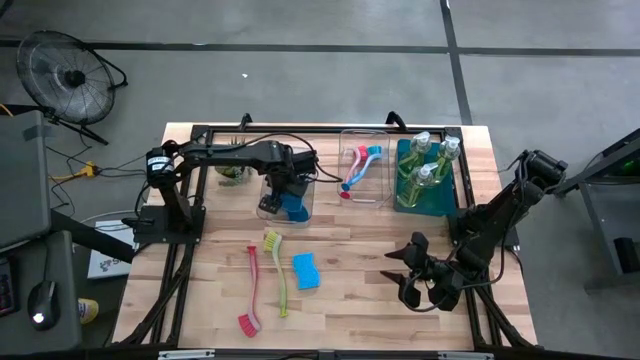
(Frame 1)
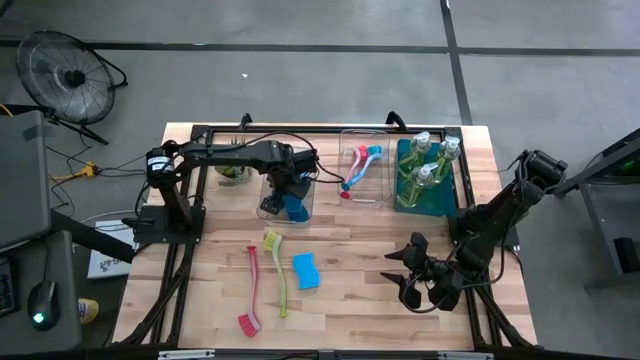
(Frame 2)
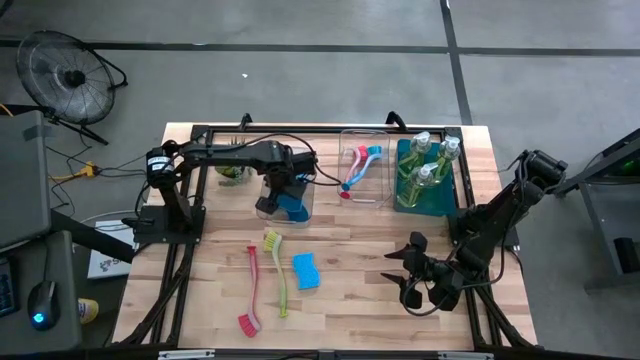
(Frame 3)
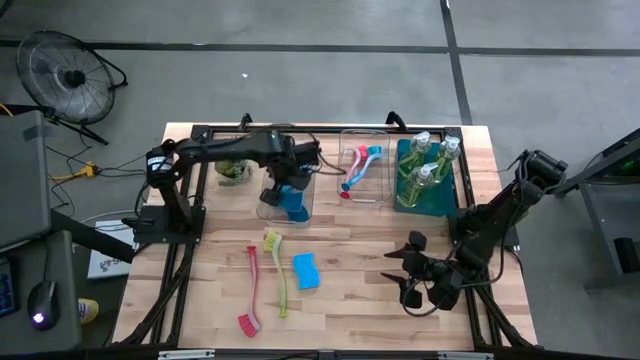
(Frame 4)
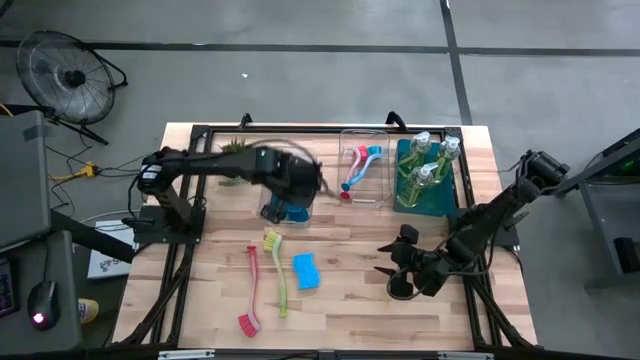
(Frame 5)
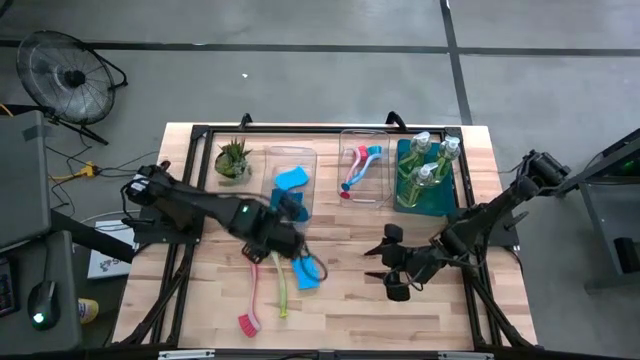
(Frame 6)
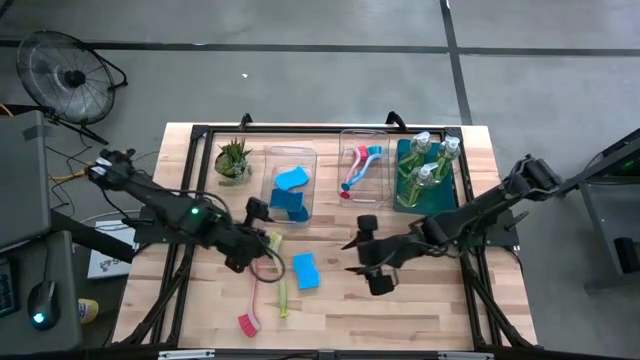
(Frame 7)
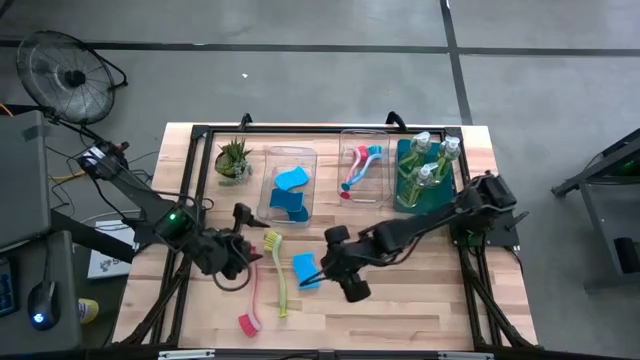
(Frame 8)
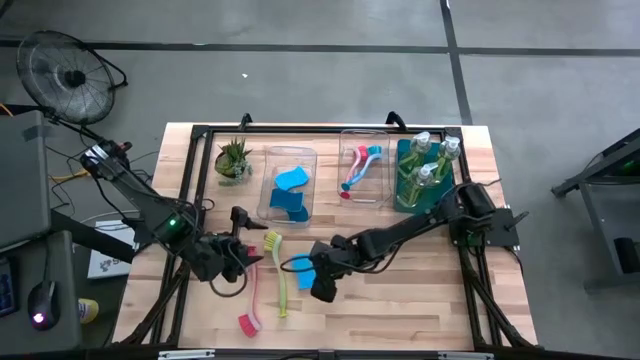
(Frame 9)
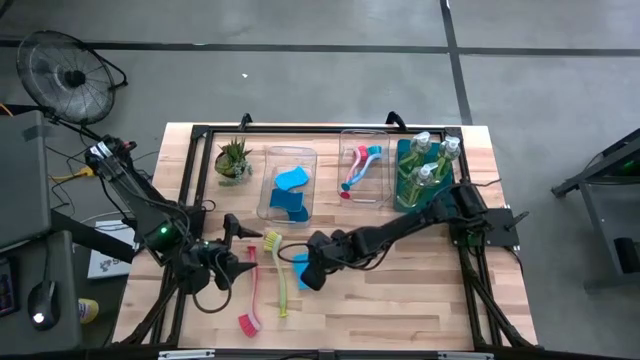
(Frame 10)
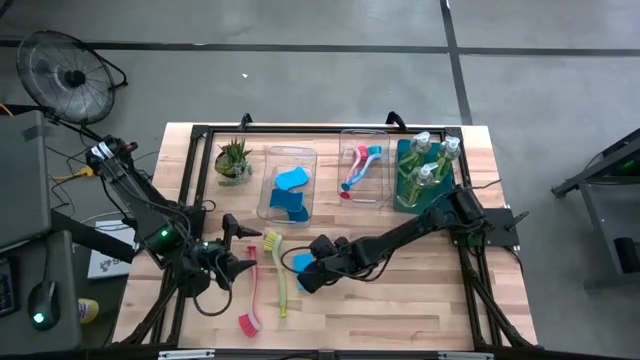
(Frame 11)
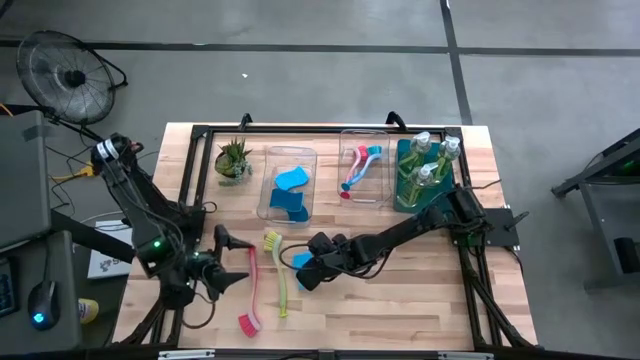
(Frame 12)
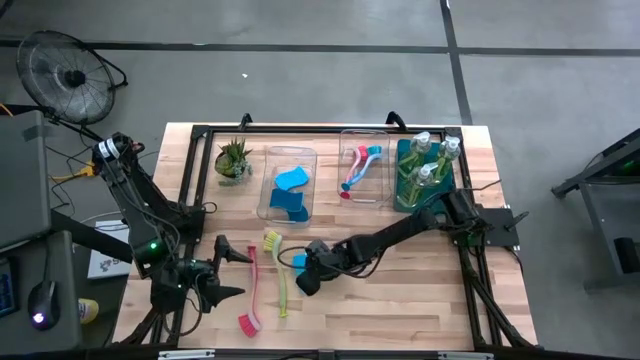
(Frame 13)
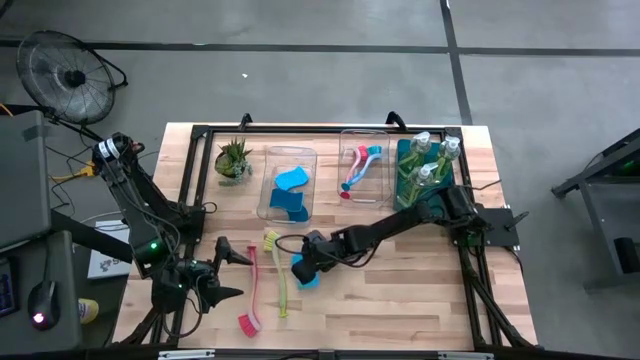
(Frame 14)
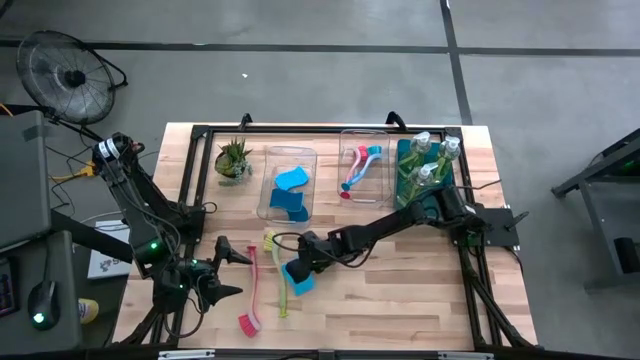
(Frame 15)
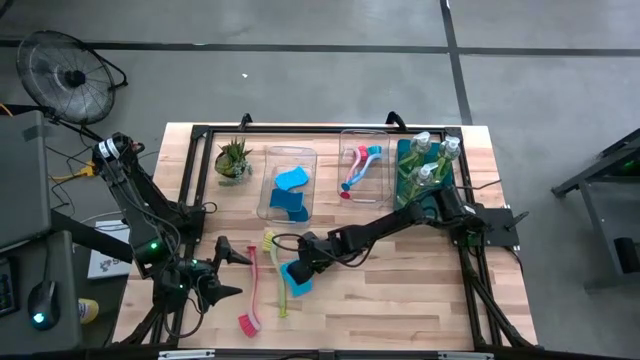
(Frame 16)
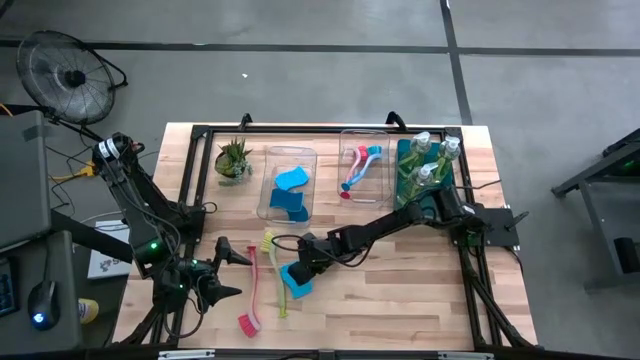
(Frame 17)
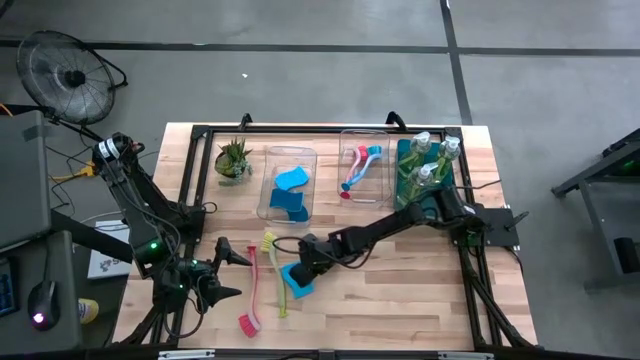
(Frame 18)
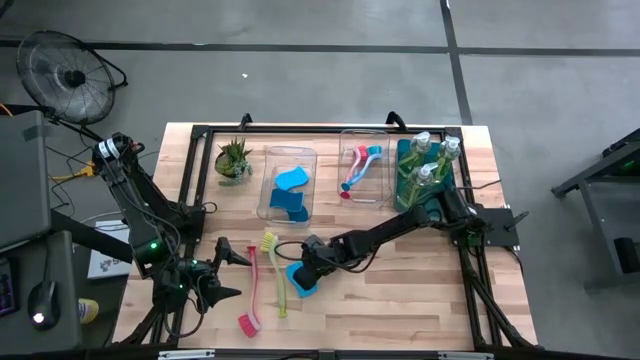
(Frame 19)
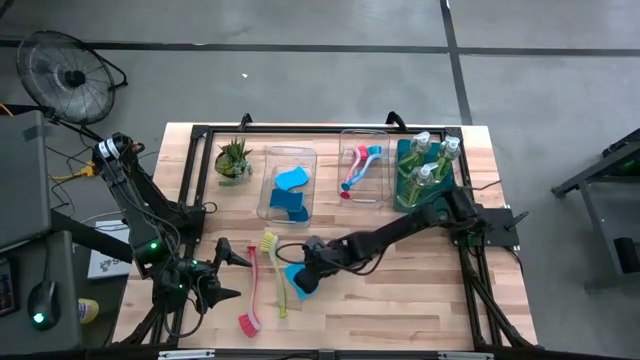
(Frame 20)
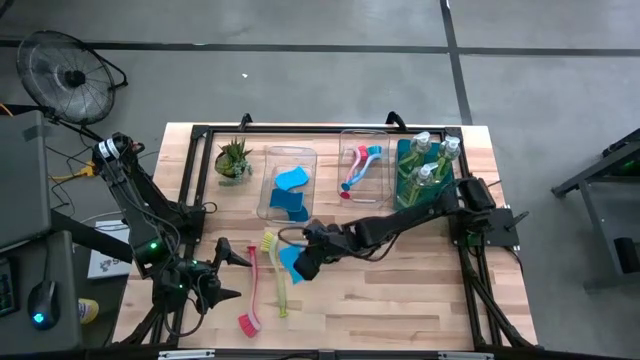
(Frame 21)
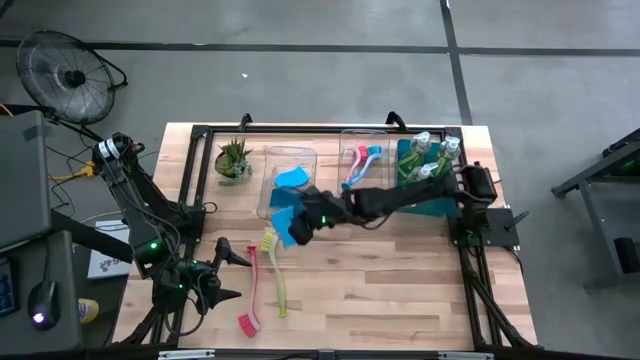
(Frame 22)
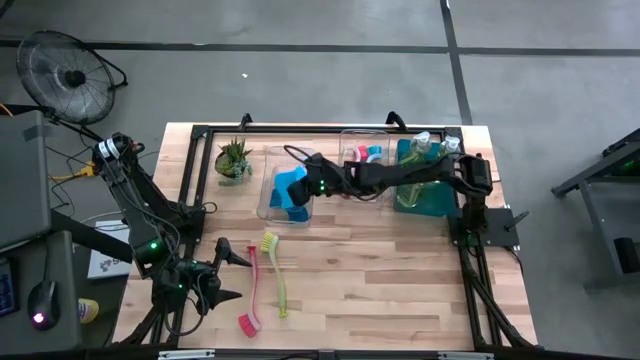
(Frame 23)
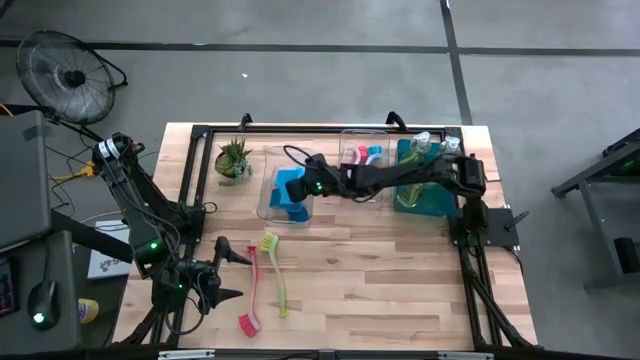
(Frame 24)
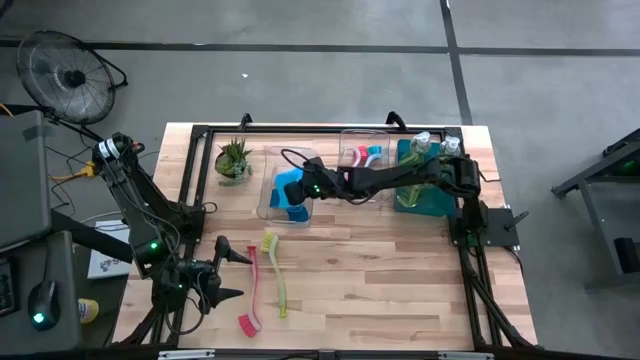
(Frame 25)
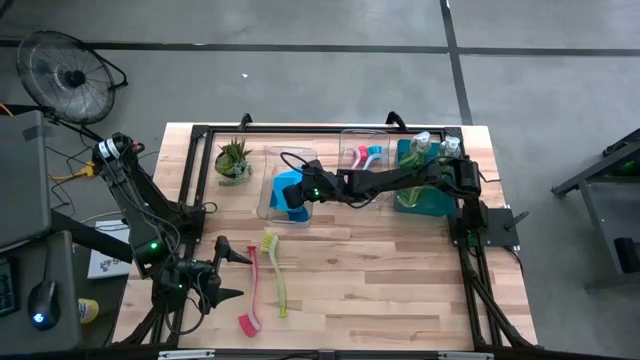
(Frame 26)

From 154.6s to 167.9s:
Task: Pick & Place Kitchen Sink Supplies
Put the blue dishwashing sponge into the left transparent bin

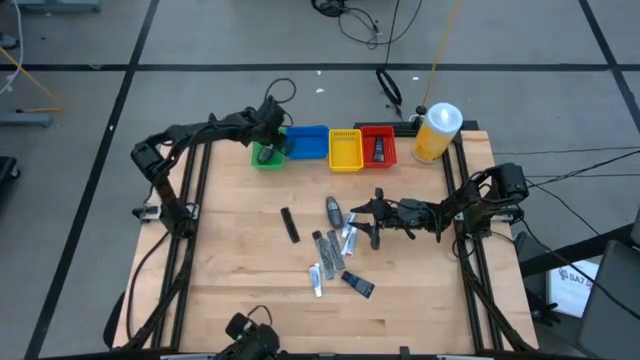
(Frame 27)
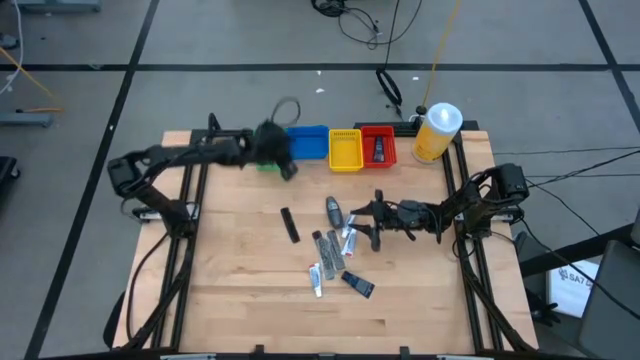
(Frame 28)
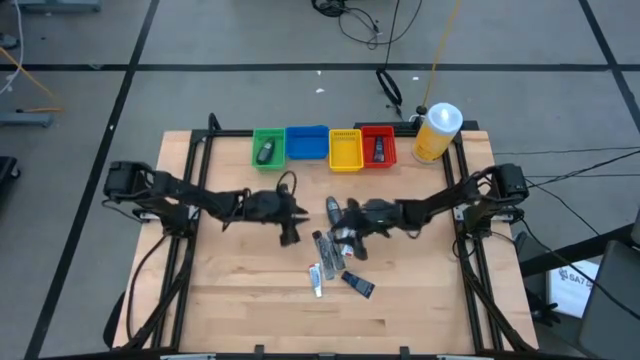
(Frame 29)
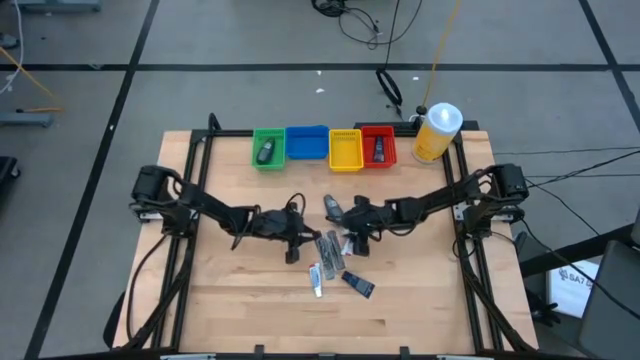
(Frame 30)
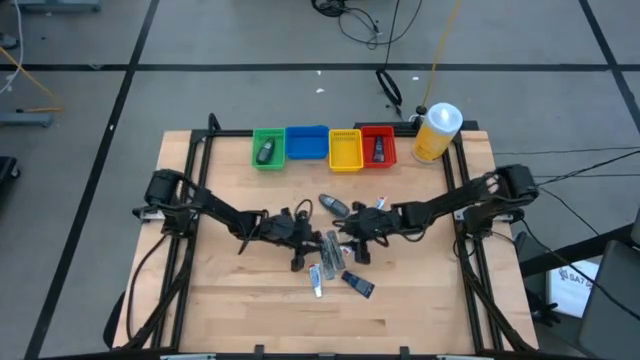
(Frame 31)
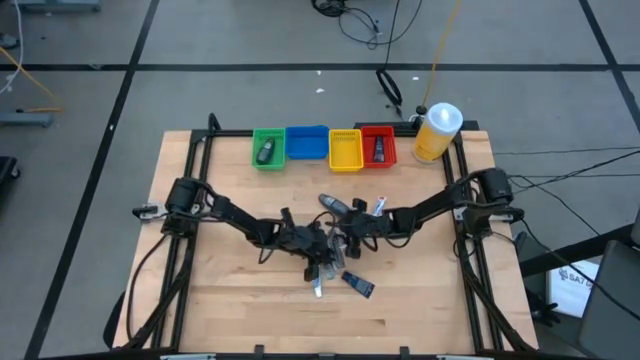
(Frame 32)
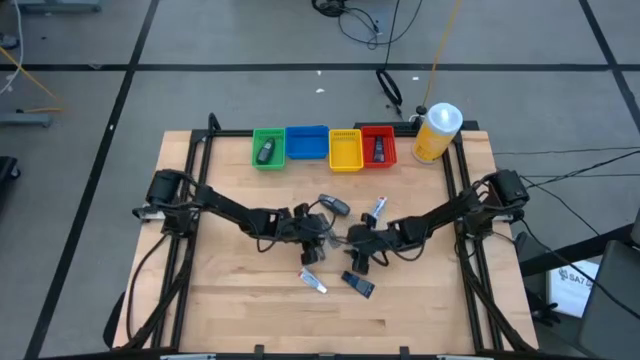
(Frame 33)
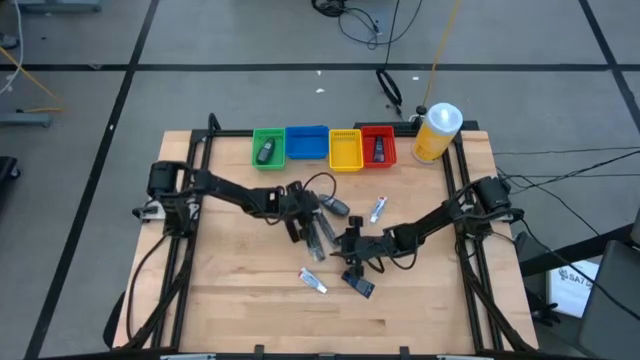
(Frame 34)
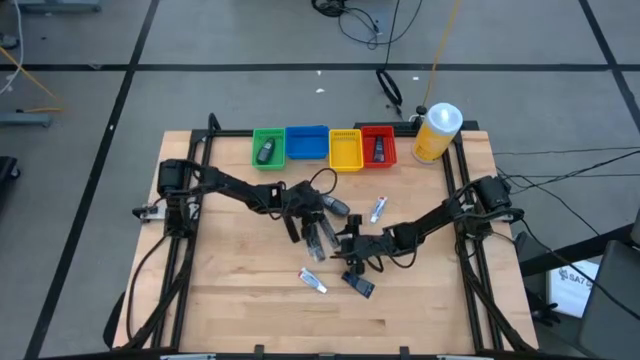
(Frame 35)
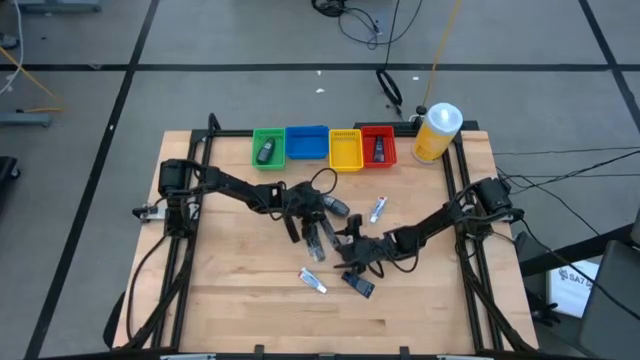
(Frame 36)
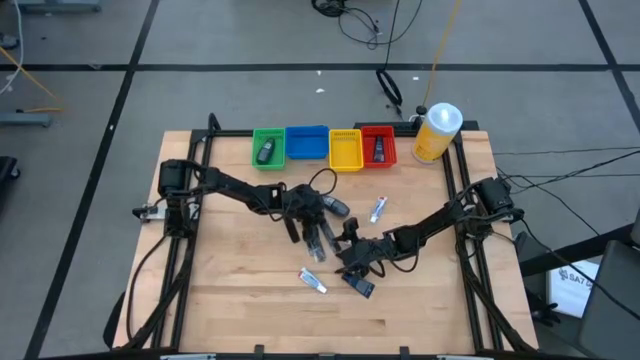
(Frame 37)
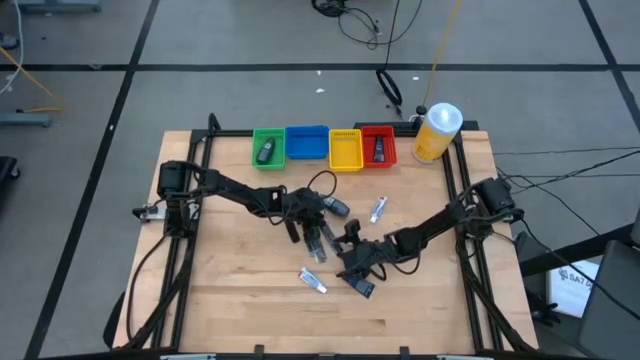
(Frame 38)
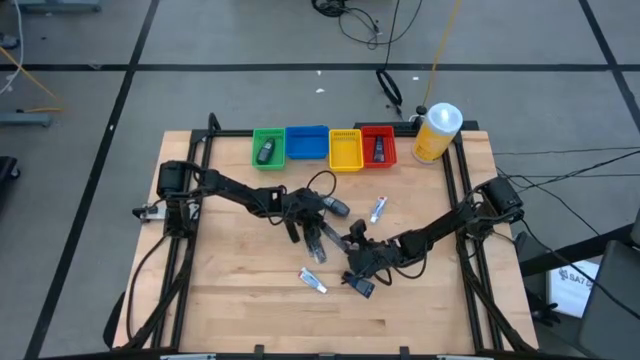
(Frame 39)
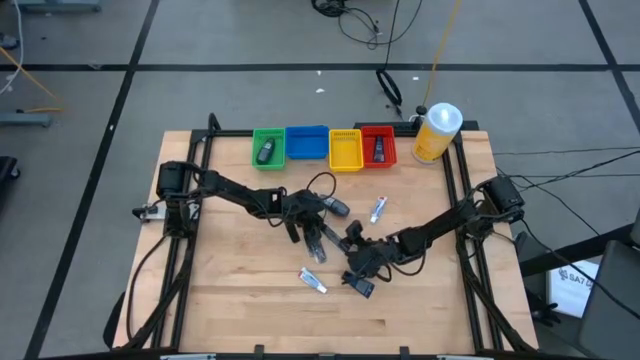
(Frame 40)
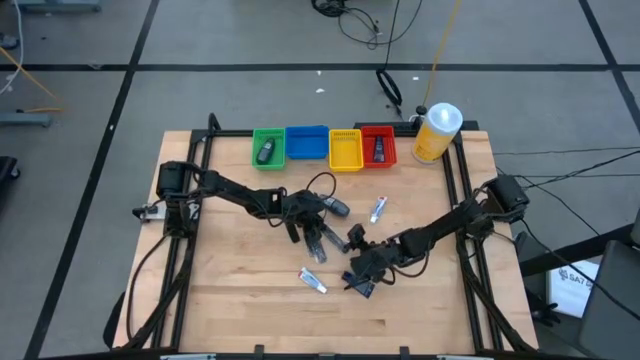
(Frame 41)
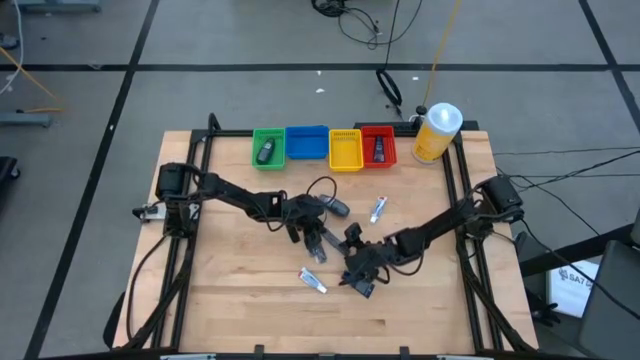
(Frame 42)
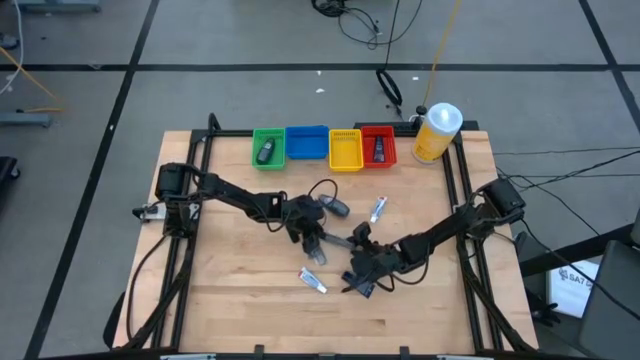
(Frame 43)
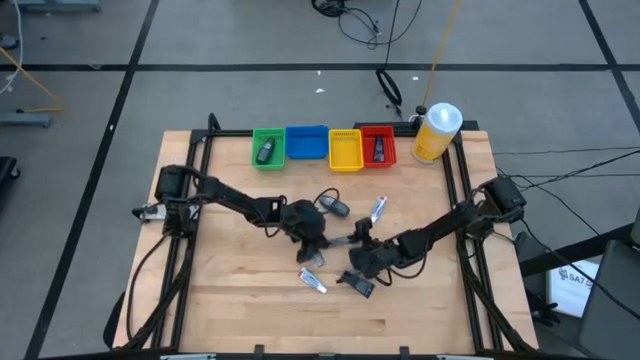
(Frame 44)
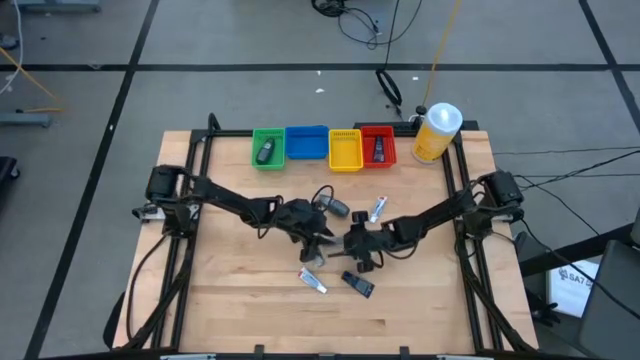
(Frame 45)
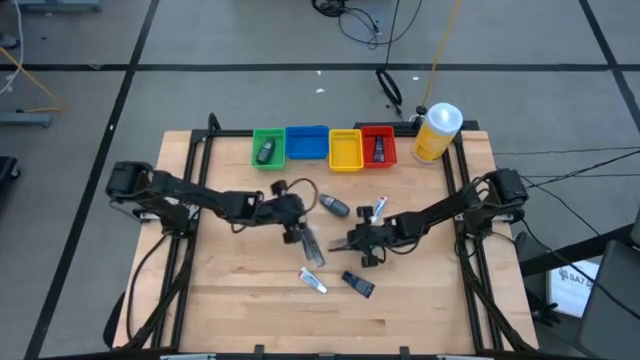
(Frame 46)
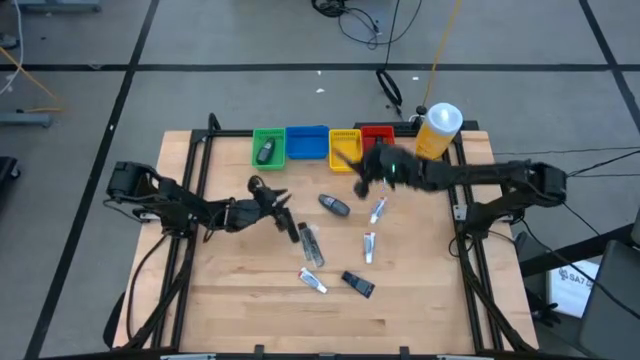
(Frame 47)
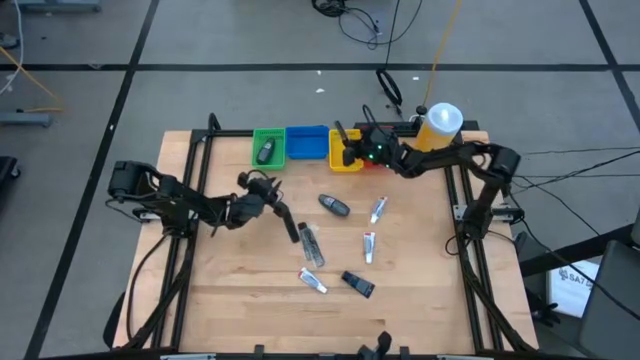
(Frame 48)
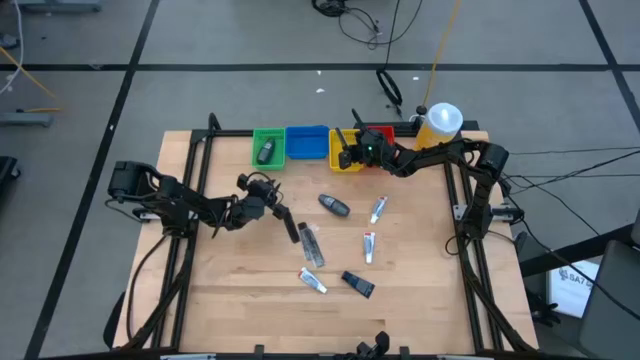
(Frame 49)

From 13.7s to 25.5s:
Task: Pick & Place Travel size toiletries
Put the right black comb into the yellow bin
